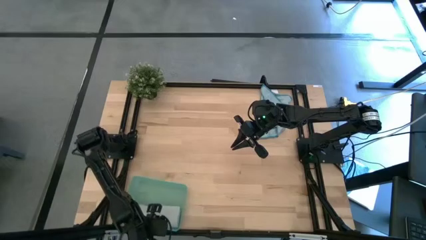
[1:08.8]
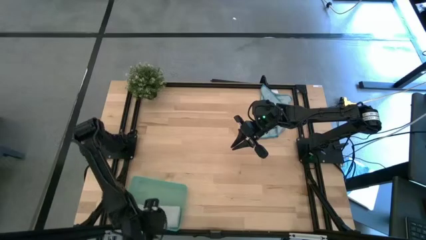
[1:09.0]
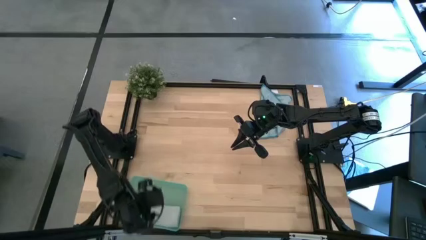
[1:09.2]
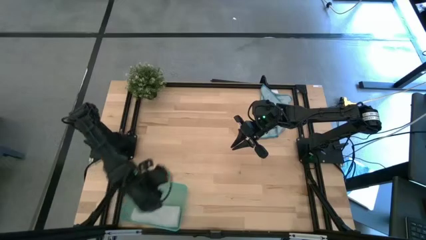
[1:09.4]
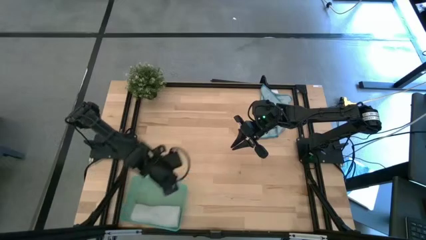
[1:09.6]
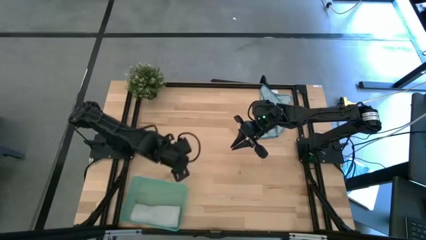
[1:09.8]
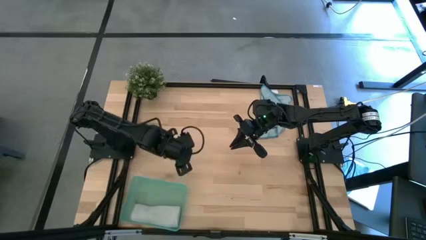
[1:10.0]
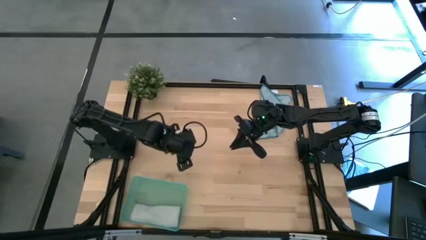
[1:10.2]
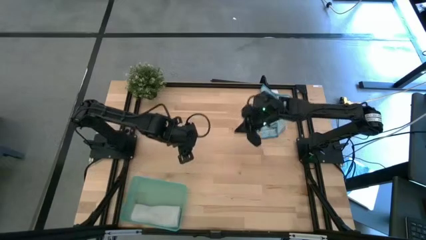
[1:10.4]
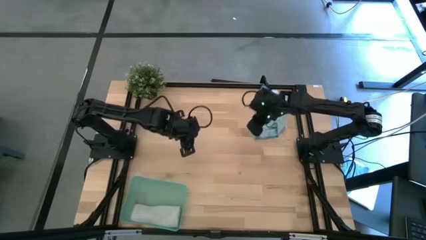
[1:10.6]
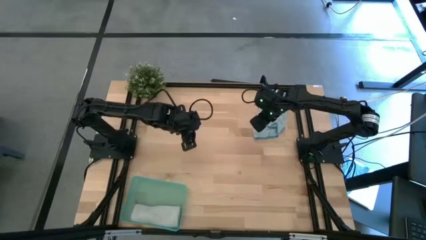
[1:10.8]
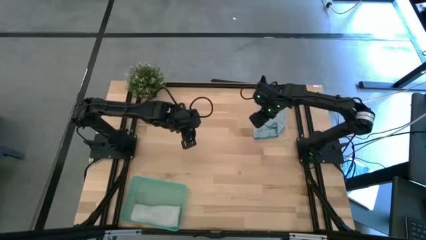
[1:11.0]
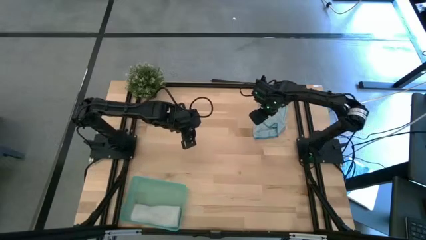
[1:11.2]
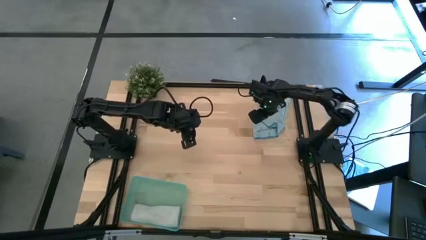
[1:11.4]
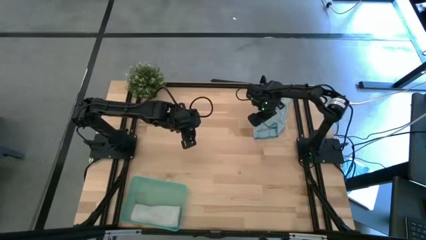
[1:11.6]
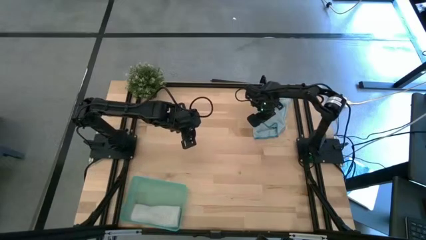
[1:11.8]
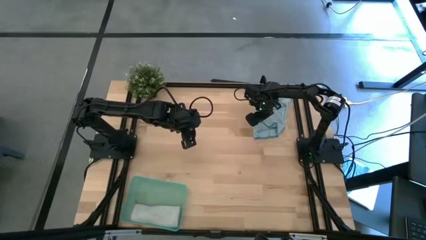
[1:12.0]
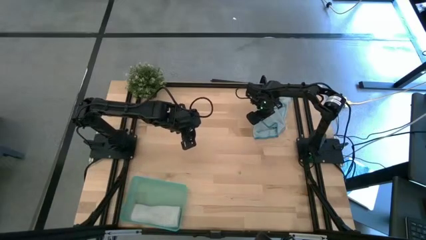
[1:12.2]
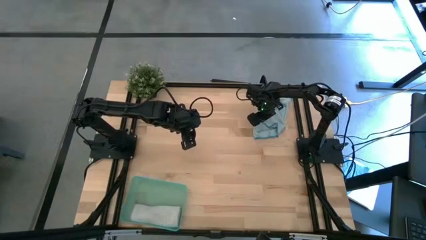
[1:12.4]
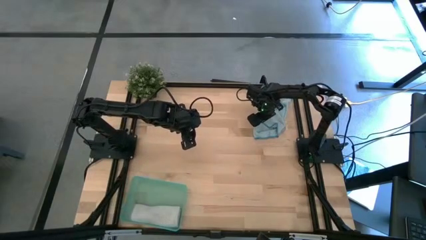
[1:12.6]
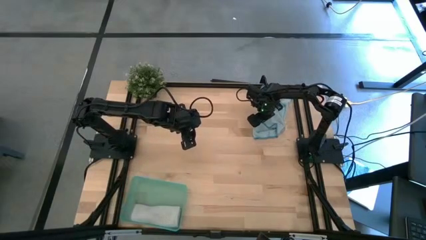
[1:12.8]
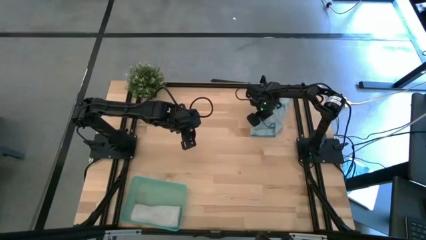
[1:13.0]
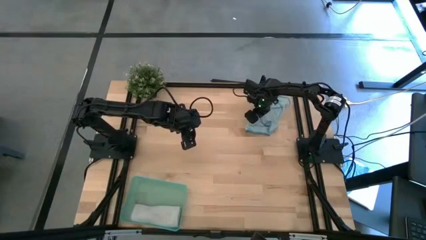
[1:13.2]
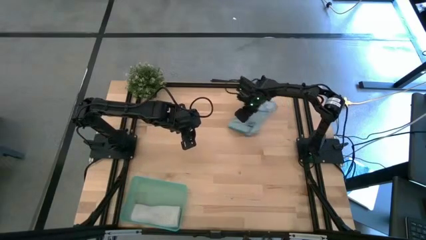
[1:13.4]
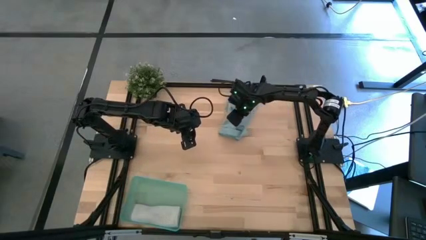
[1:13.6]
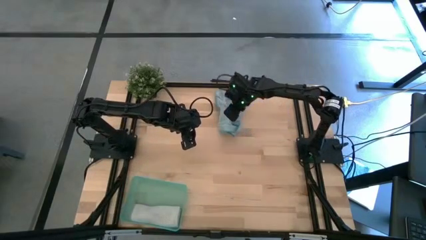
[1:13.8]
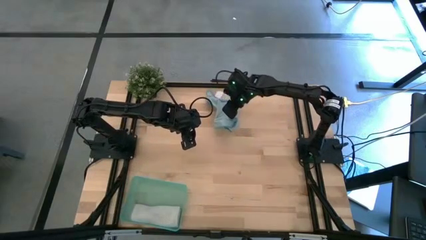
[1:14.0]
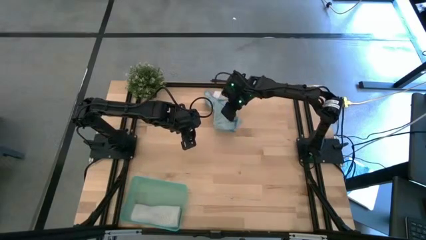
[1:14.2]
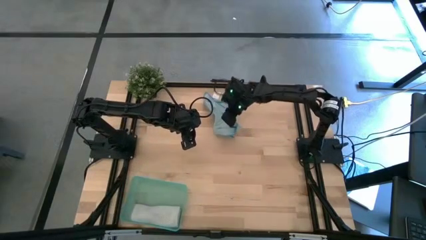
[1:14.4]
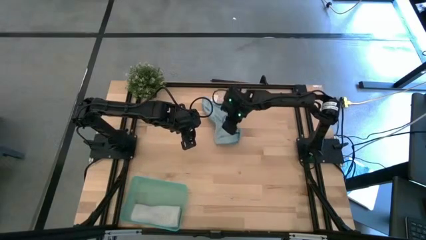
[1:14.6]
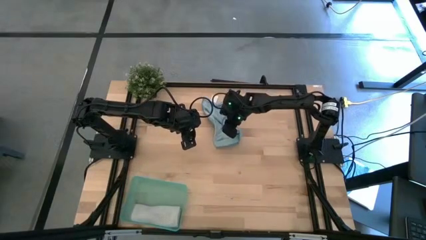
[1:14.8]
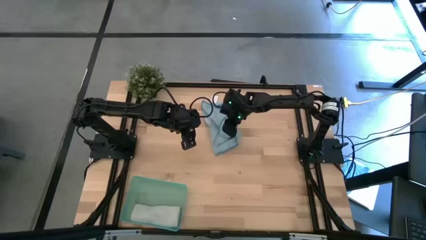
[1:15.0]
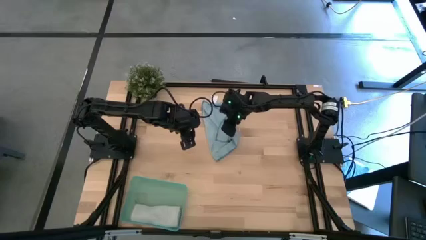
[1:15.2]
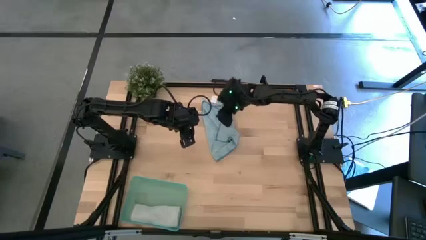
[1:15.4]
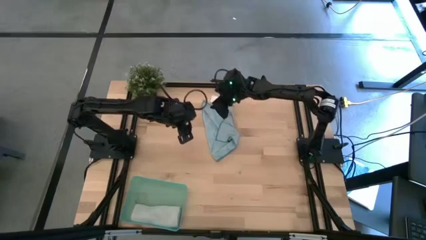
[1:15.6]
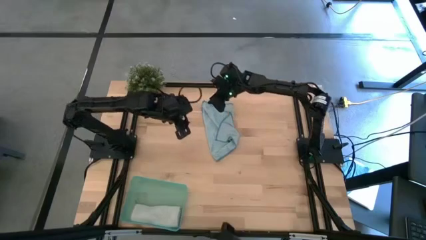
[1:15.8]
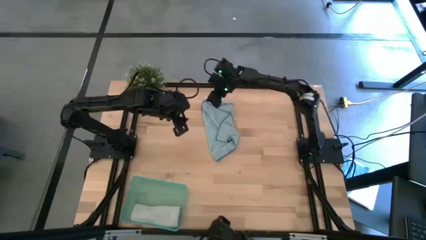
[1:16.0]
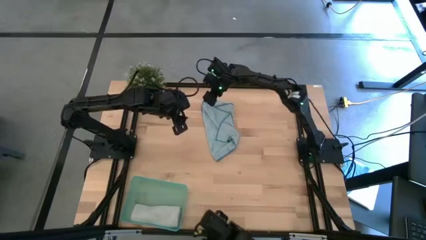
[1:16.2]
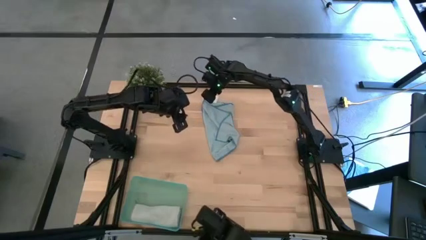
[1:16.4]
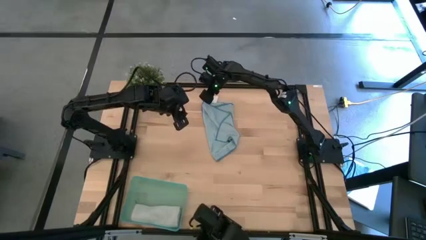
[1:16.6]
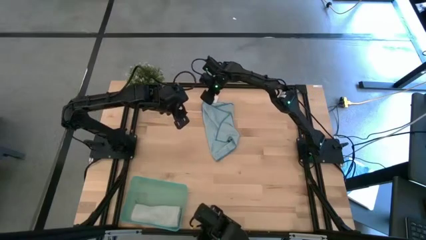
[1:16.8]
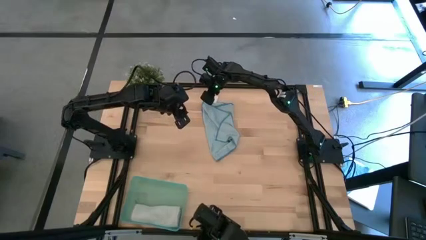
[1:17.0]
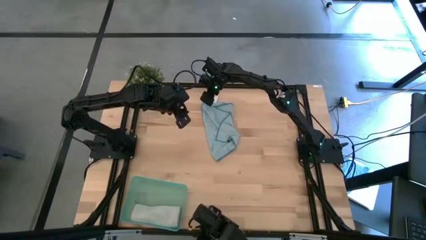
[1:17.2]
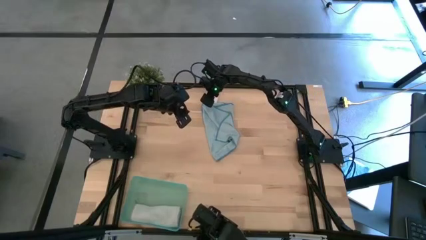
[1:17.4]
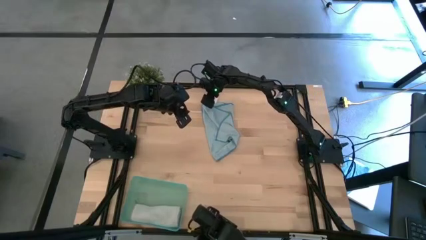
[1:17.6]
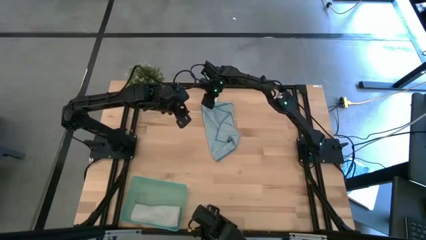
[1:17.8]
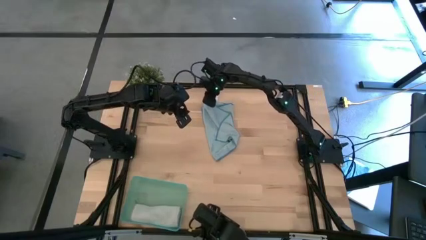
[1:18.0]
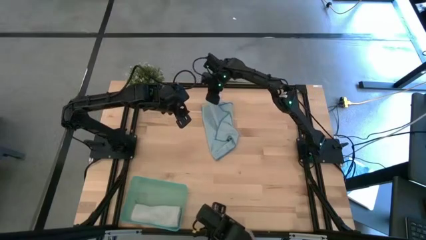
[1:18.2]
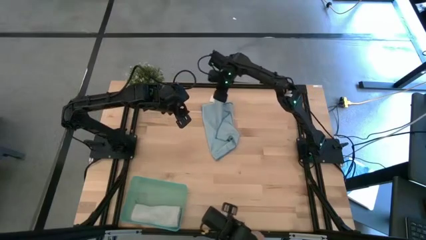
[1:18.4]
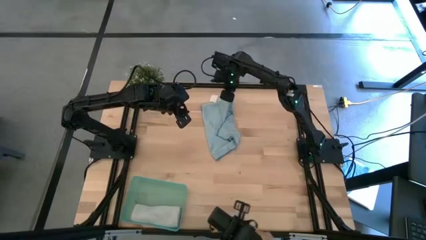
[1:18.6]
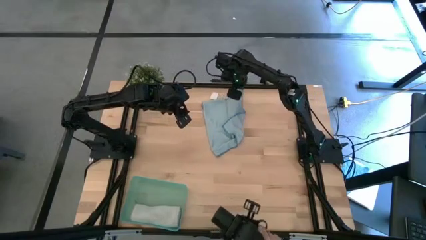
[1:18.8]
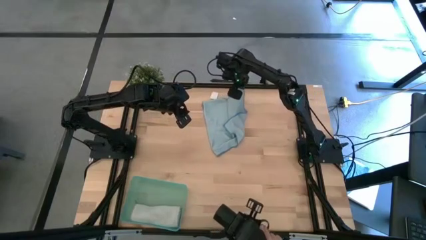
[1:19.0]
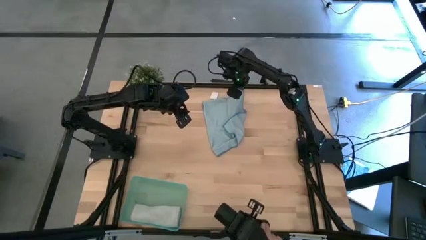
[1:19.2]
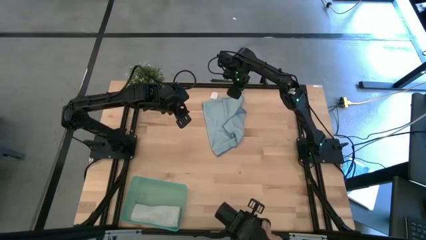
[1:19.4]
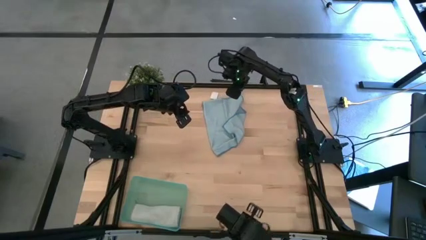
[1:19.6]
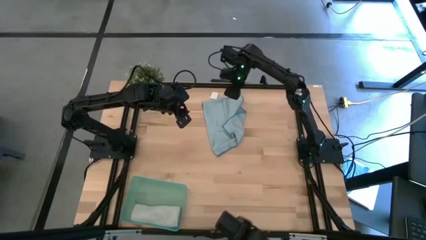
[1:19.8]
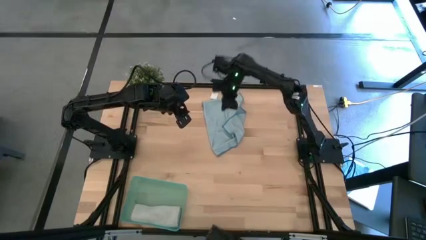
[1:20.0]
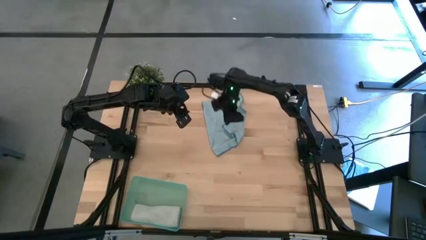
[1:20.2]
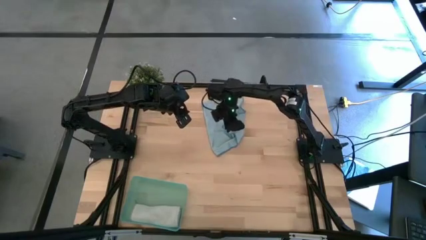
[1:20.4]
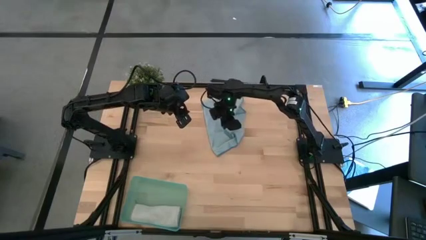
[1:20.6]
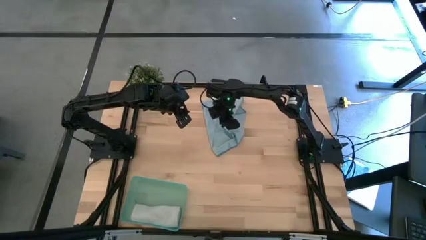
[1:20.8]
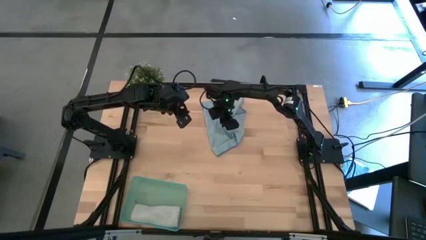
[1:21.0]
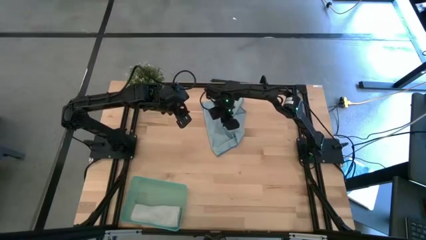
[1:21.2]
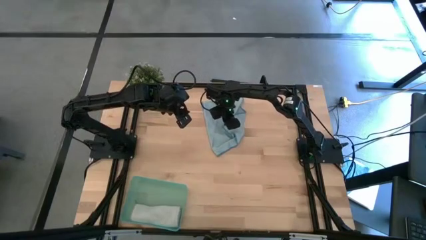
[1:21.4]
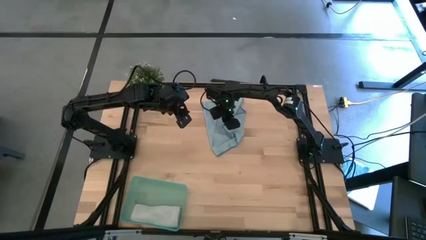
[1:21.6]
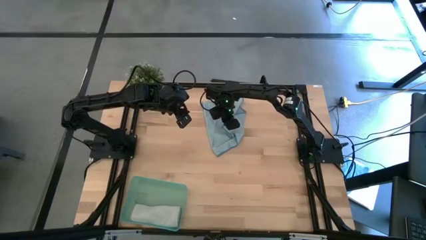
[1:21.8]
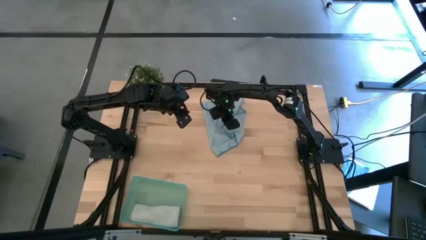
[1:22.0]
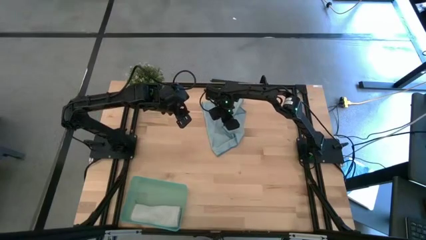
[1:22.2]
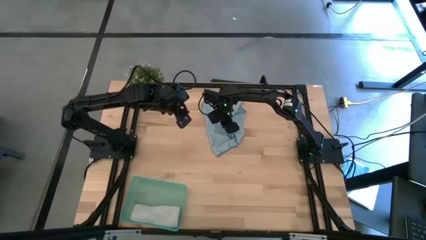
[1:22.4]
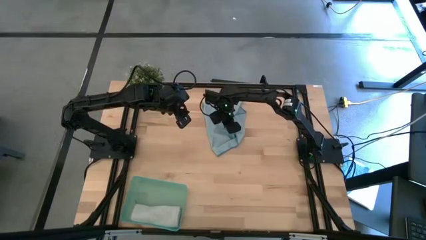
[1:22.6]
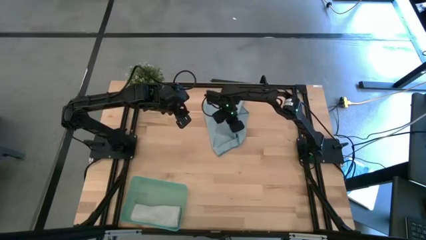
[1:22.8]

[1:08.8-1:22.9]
Task: Roll microfiber towels into tight, uniform cylinder then place into a basket
Roll the blue microfiber cloth
